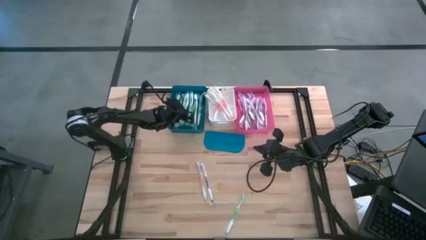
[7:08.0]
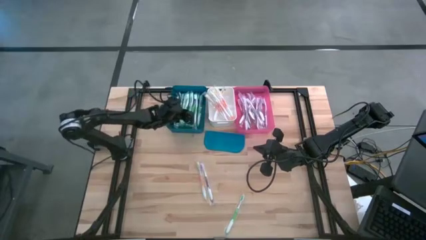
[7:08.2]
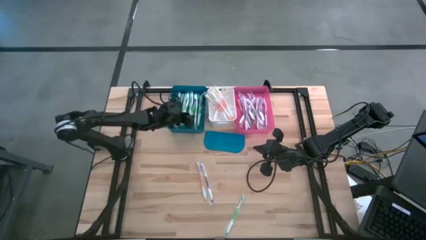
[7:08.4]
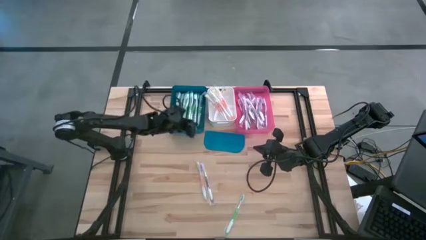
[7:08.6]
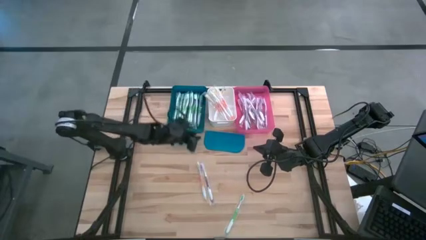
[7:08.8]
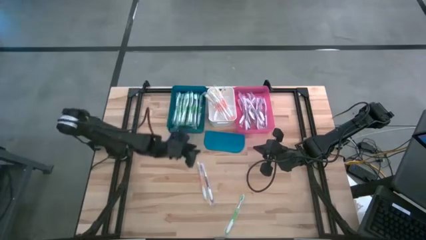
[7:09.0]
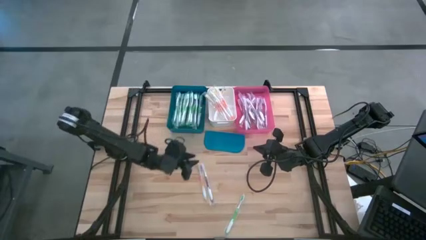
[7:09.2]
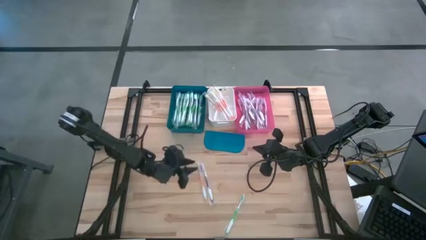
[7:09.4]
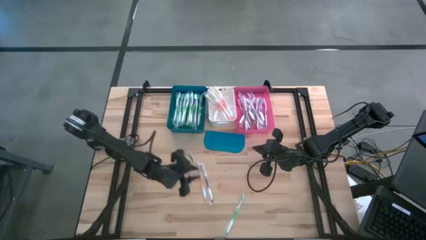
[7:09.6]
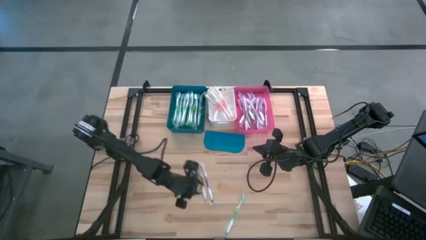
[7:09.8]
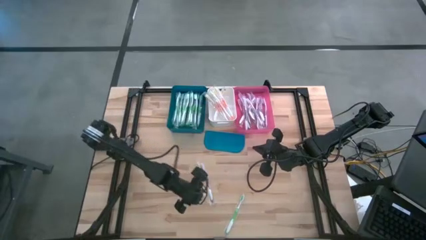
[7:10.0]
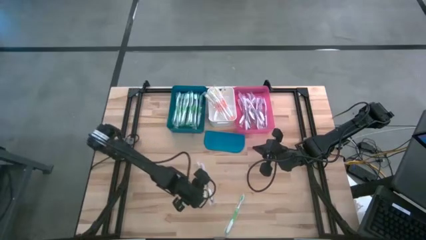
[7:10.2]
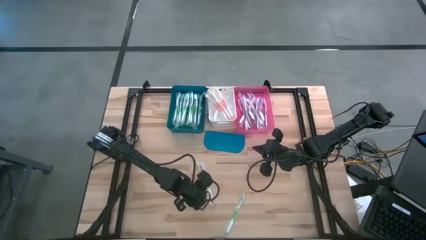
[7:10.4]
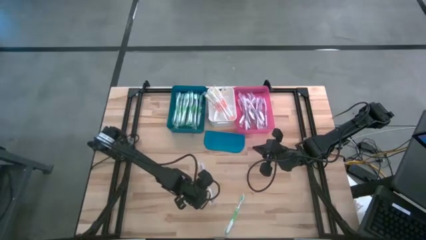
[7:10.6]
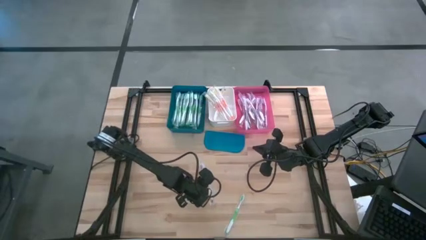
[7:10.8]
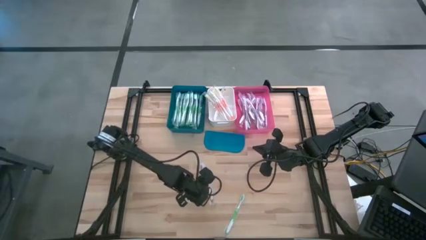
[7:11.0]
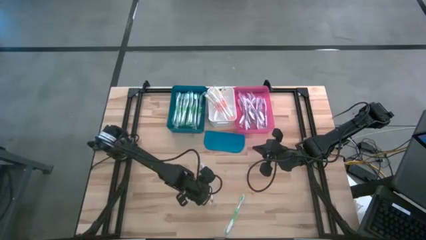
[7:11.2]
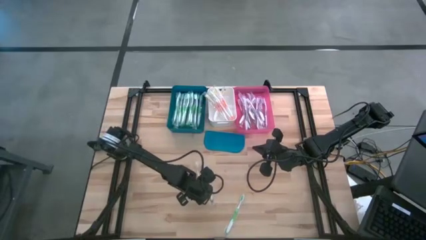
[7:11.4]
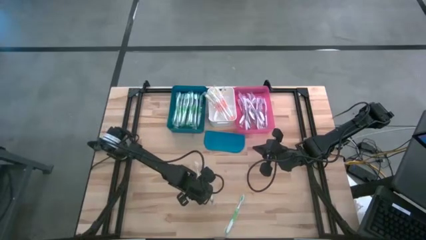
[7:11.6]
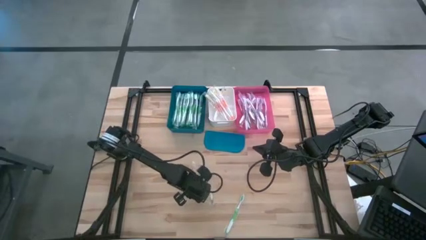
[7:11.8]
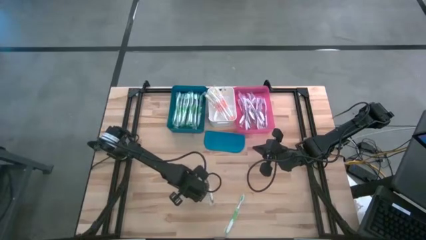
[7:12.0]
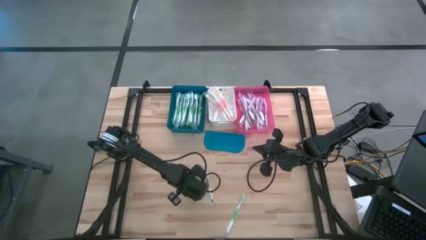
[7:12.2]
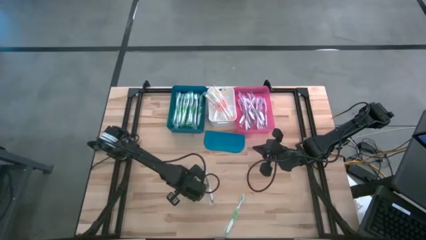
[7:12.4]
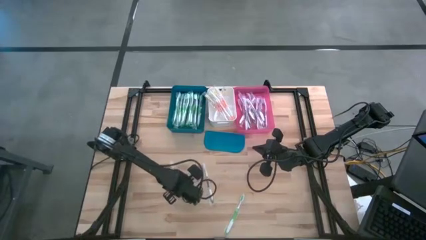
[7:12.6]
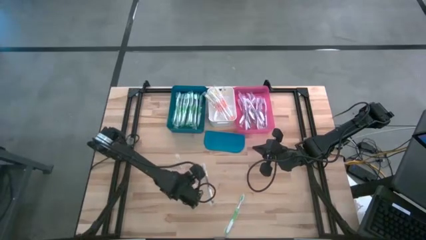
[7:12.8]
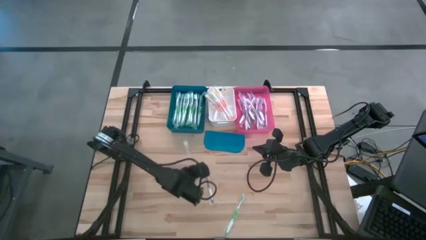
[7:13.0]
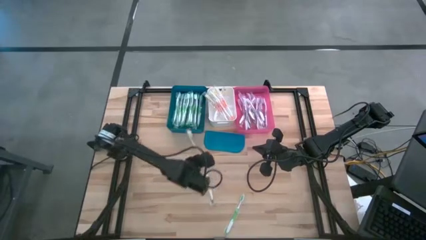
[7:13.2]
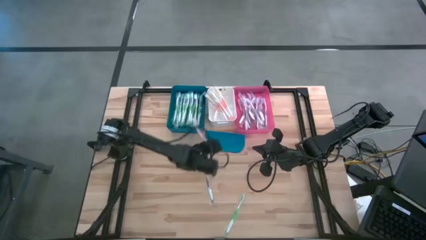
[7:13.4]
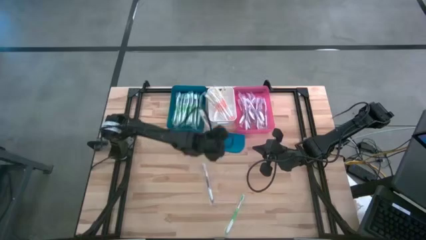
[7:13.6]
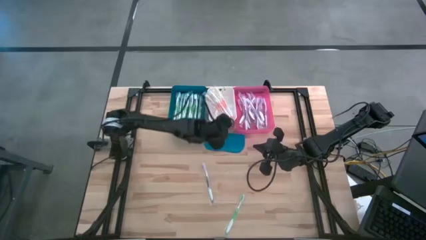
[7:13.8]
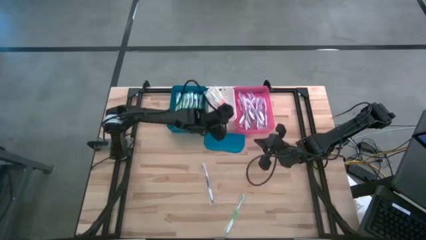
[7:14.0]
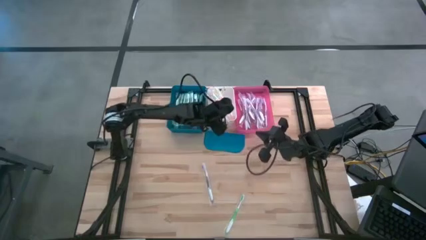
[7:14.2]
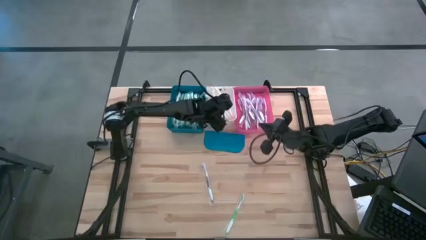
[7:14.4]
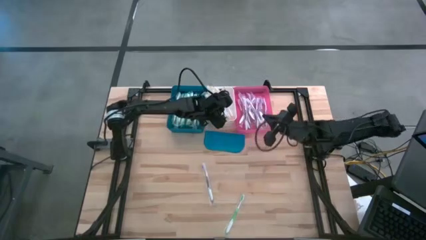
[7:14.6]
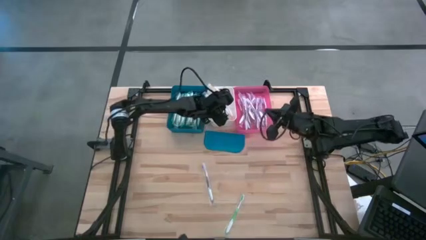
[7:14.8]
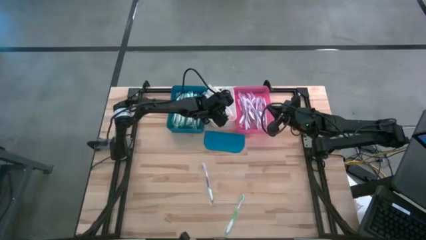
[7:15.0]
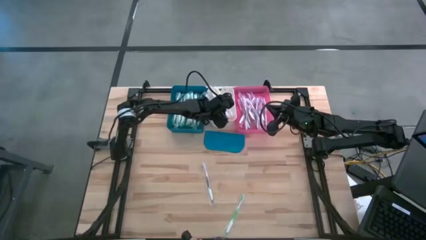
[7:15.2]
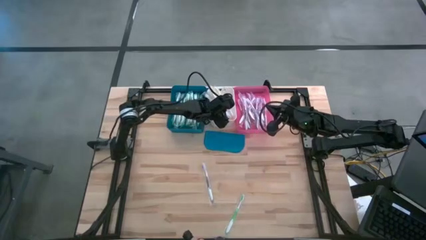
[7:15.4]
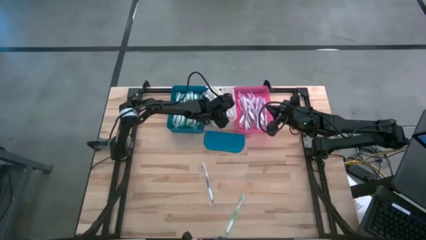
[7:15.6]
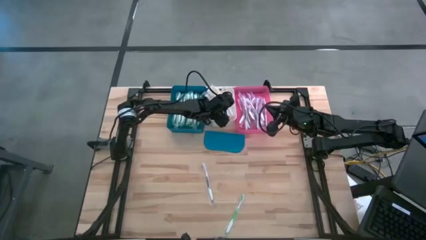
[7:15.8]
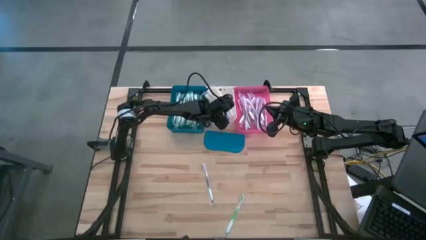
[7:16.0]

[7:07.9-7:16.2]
Task: Pick & Place Toothbrushes
Put the orange toothbrush into the white bin
